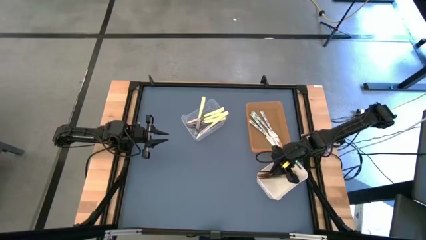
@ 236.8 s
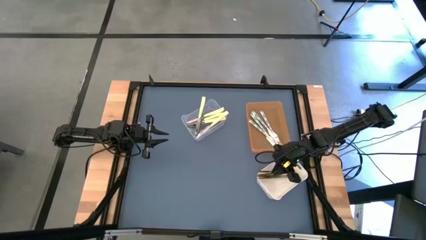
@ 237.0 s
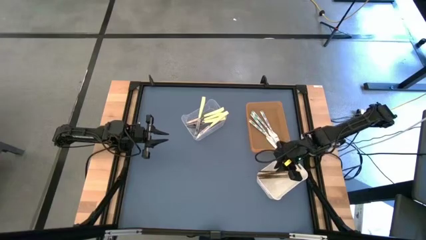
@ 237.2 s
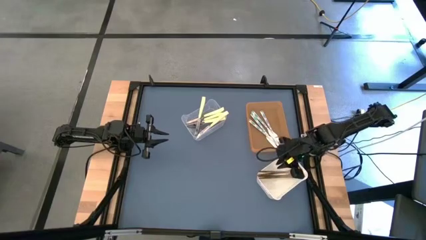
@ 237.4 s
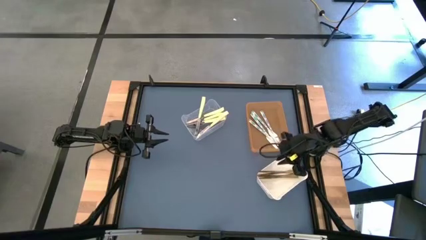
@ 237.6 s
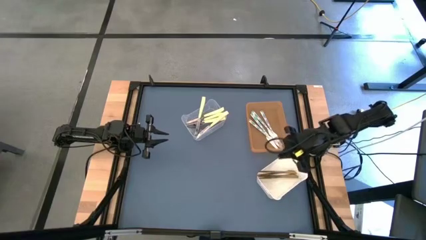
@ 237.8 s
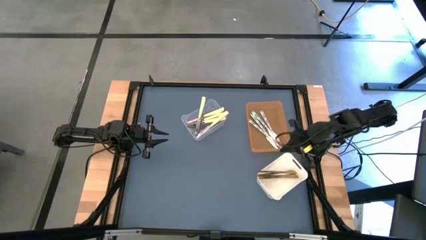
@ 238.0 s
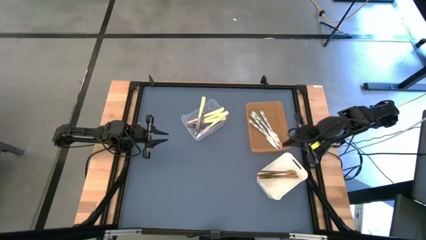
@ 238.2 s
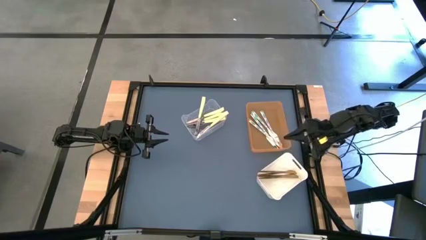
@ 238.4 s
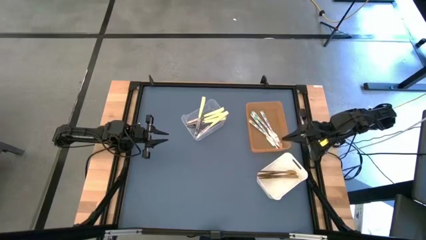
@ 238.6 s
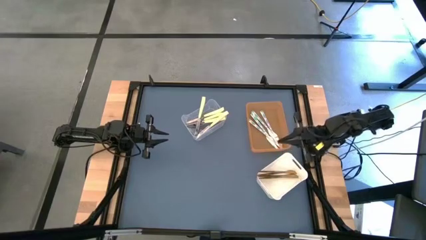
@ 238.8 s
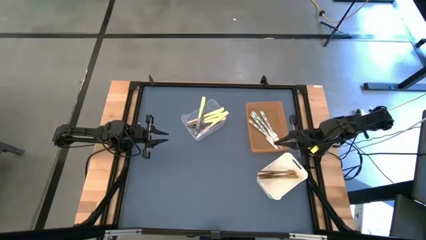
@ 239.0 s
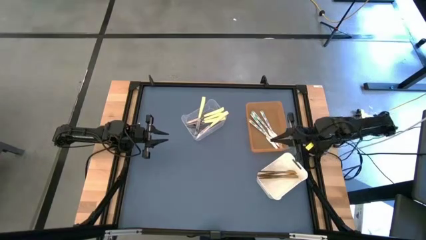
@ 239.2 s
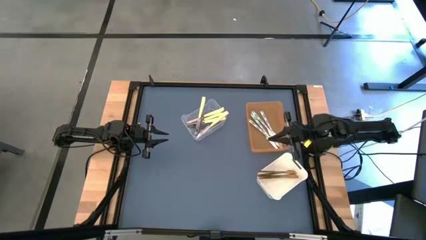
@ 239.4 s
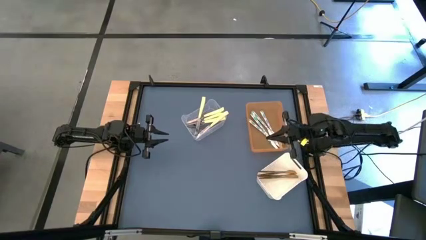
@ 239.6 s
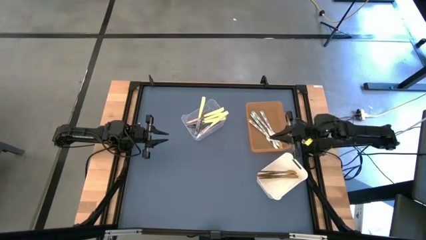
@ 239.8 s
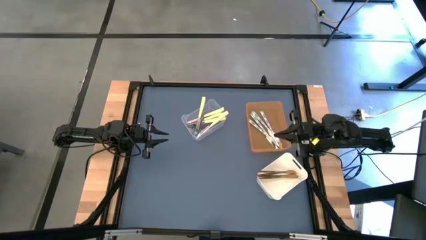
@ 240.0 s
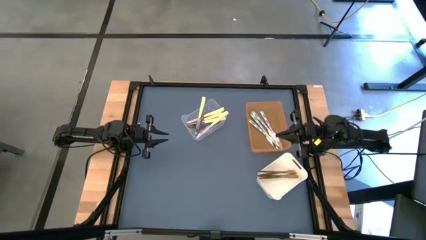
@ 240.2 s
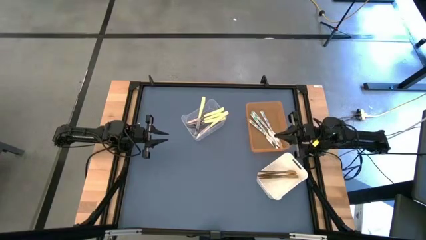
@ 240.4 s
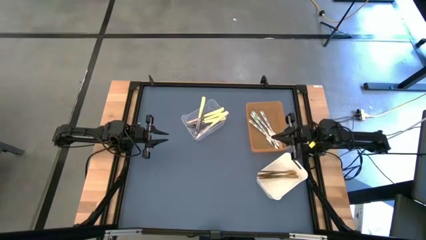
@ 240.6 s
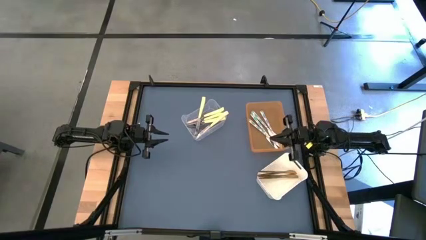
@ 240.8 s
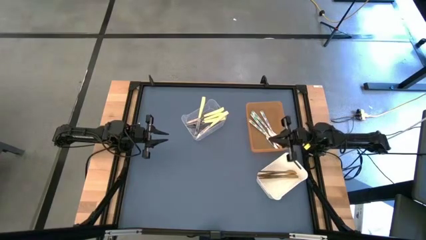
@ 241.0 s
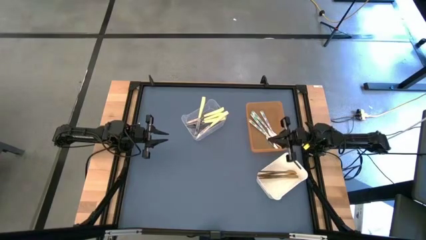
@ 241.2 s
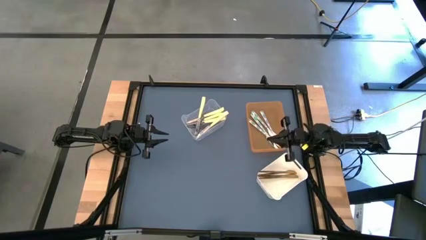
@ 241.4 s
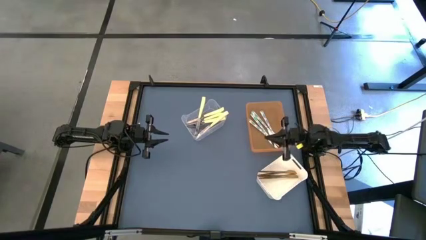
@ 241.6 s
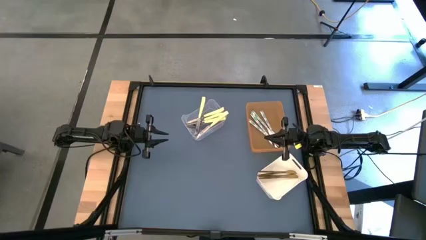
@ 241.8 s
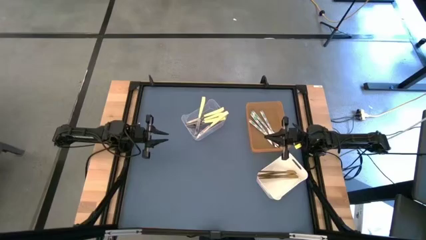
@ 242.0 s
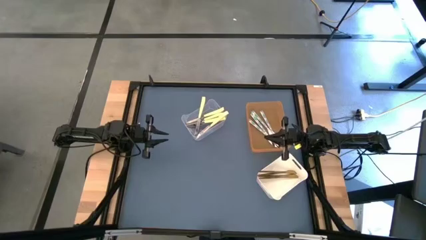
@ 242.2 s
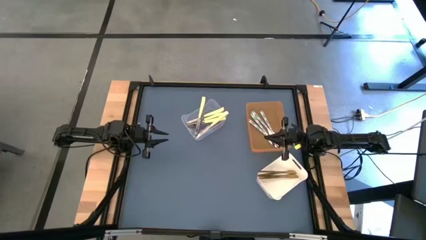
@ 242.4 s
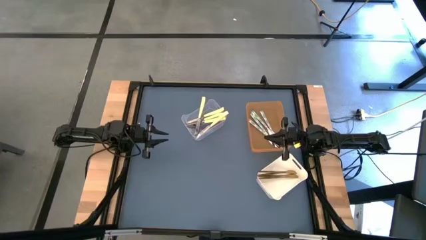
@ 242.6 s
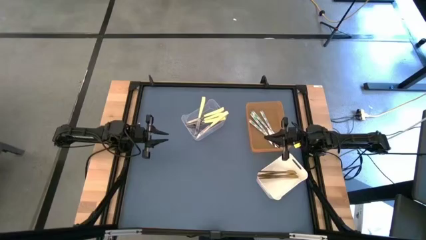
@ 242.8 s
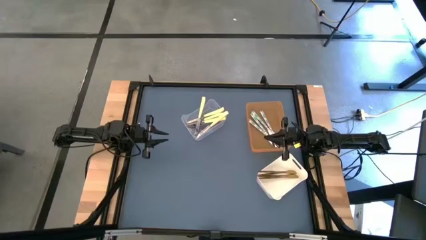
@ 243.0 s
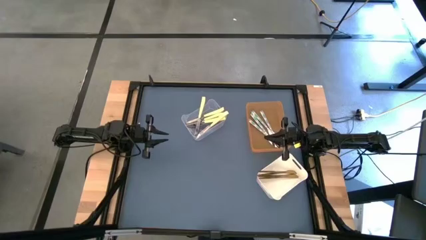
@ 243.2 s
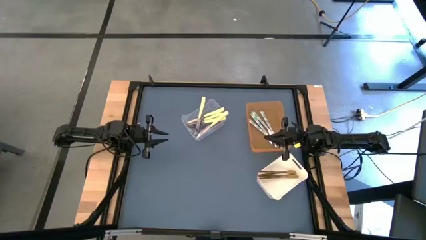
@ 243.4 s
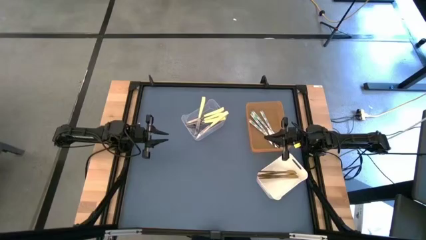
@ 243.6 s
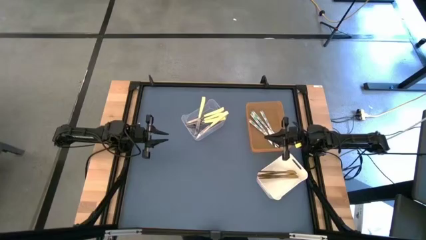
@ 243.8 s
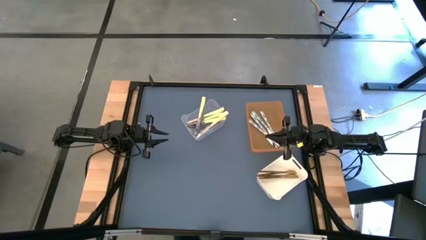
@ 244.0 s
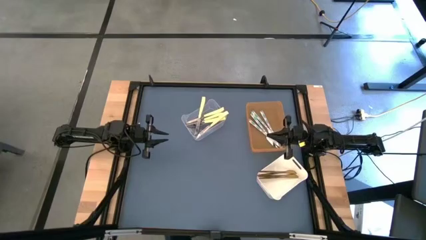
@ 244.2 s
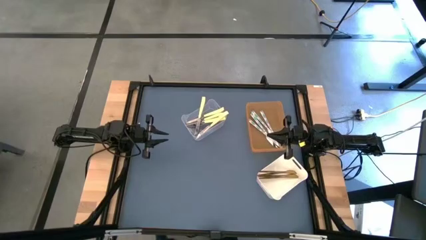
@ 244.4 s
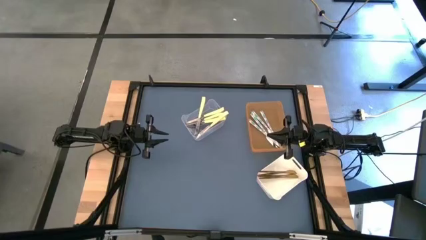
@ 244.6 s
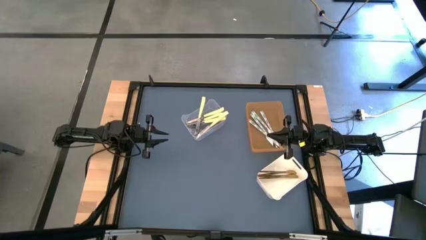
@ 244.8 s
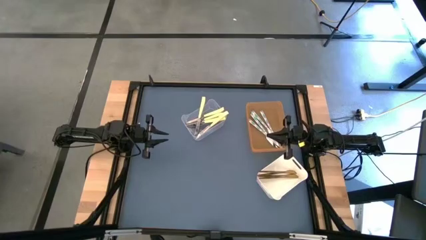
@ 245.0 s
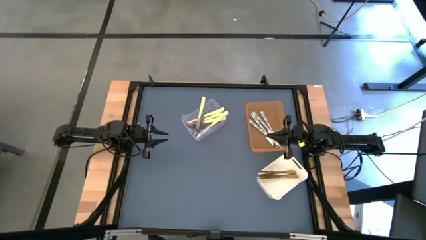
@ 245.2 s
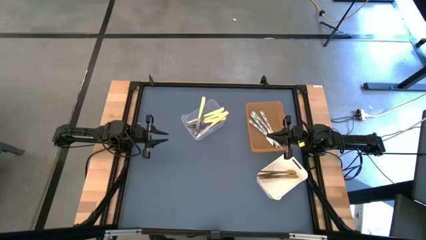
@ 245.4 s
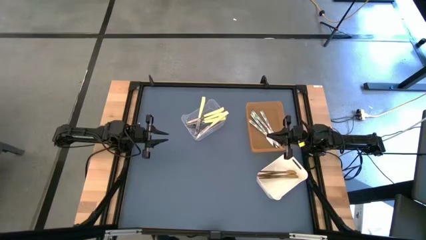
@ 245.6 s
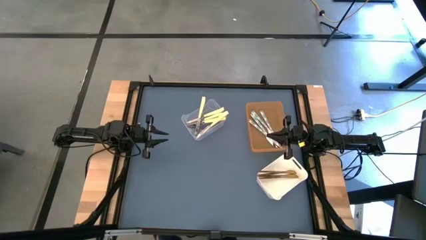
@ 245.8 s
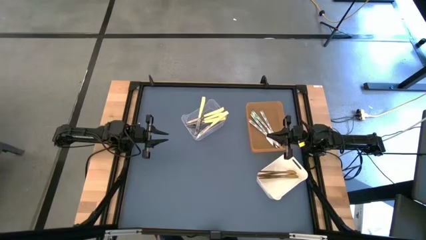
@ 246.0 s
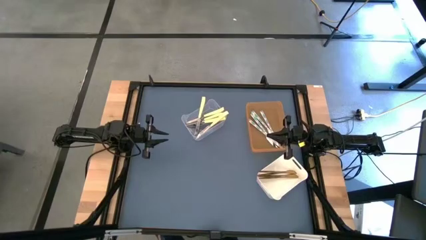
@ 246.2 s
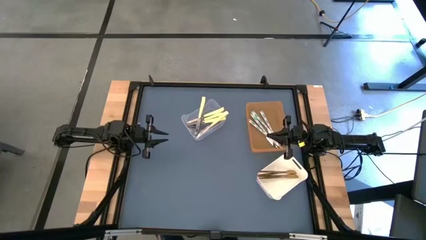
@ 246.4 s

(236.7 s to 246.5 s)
Task: Sort silverware by color (type)
Return to Home Position

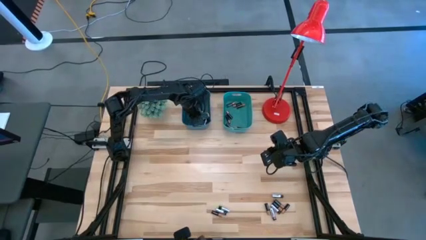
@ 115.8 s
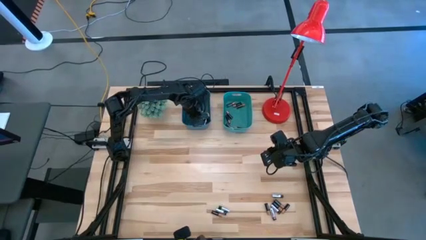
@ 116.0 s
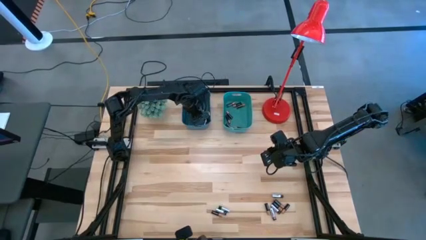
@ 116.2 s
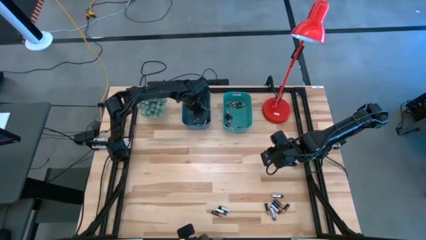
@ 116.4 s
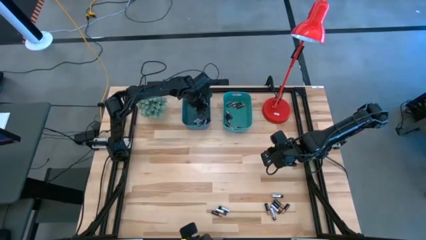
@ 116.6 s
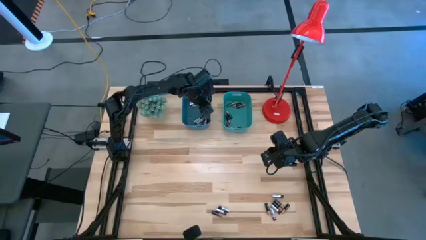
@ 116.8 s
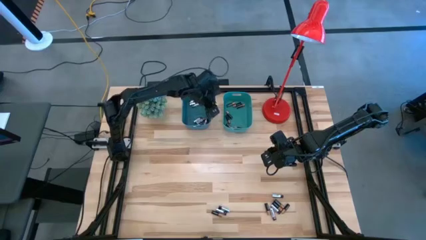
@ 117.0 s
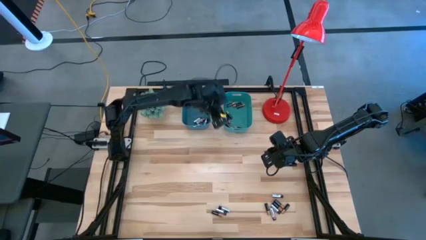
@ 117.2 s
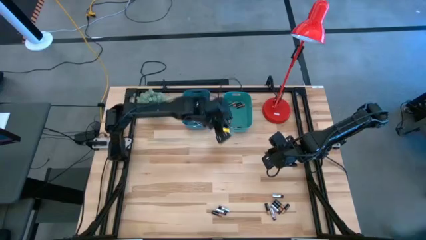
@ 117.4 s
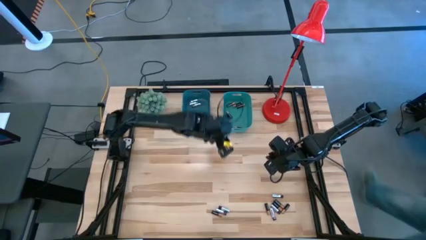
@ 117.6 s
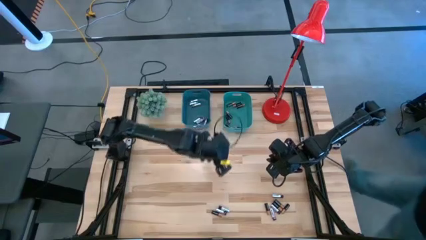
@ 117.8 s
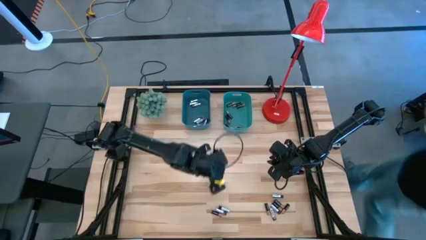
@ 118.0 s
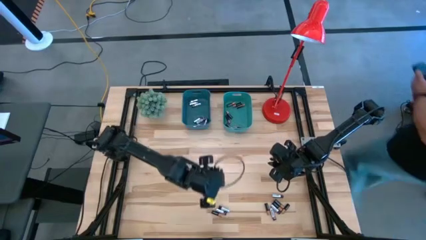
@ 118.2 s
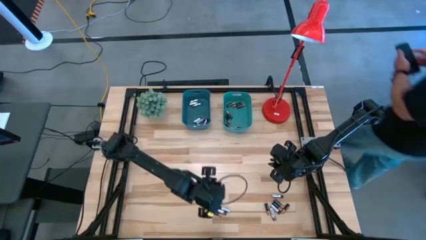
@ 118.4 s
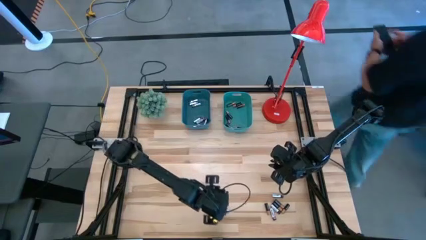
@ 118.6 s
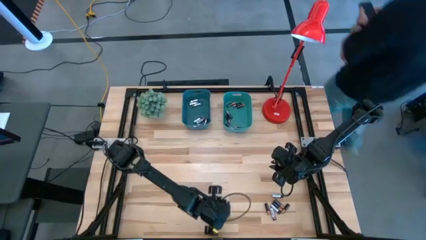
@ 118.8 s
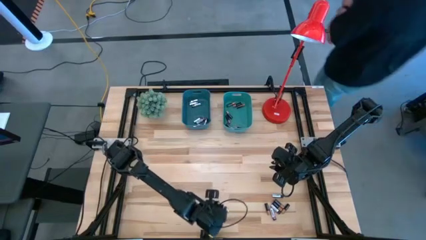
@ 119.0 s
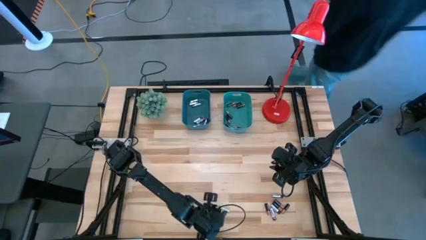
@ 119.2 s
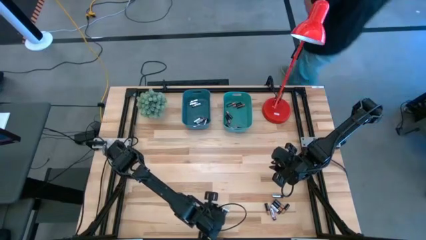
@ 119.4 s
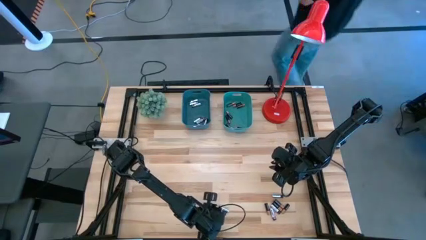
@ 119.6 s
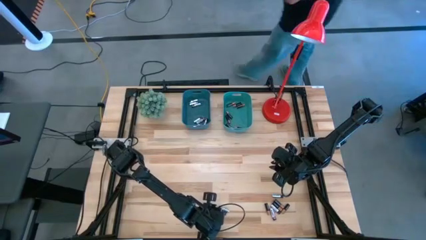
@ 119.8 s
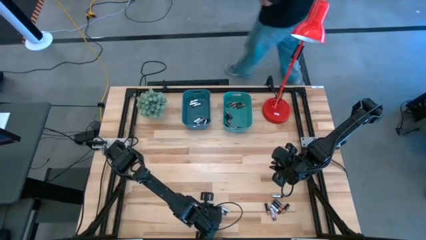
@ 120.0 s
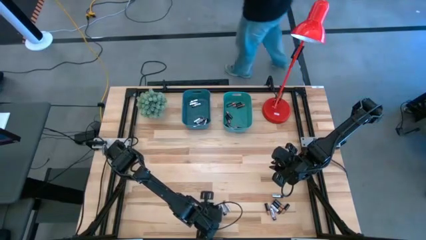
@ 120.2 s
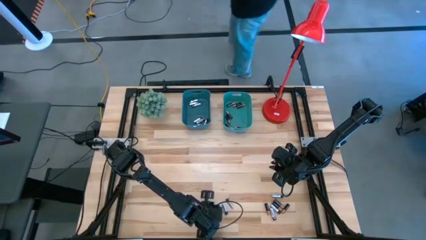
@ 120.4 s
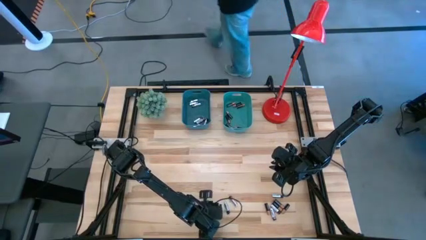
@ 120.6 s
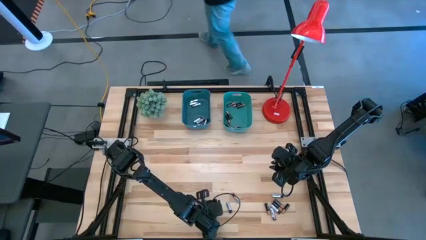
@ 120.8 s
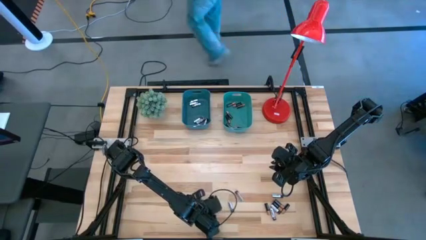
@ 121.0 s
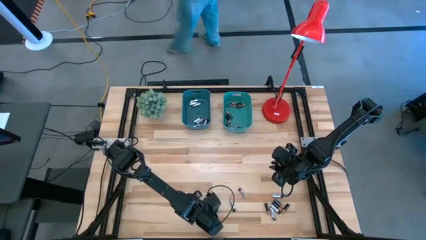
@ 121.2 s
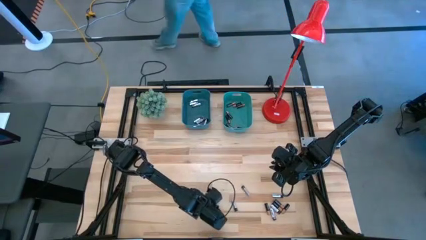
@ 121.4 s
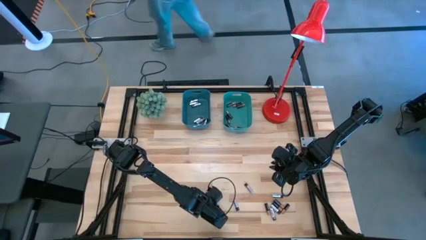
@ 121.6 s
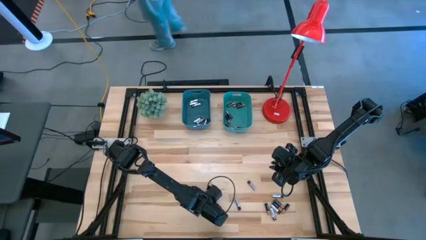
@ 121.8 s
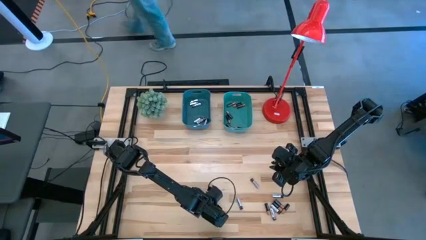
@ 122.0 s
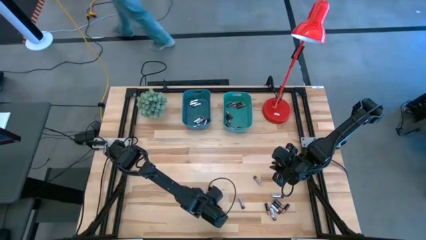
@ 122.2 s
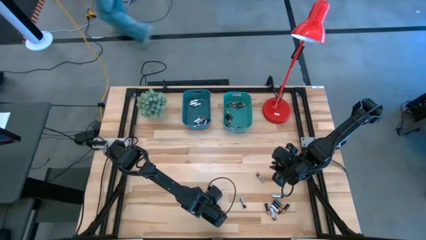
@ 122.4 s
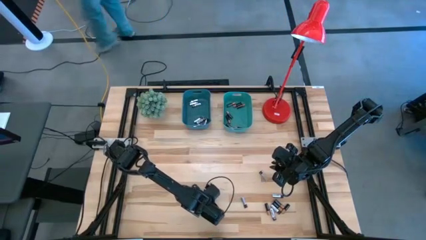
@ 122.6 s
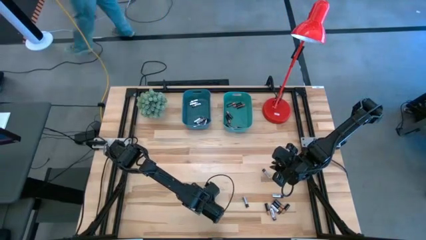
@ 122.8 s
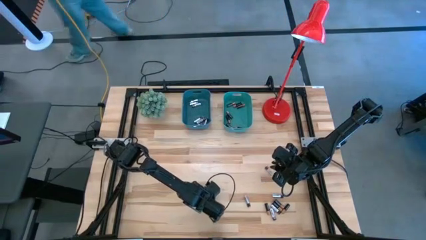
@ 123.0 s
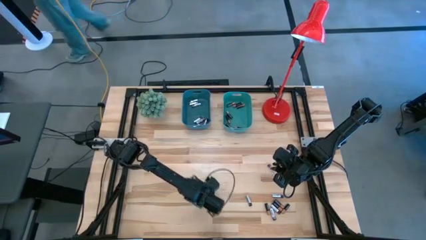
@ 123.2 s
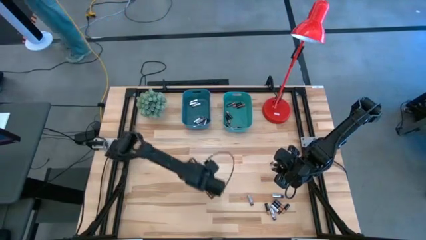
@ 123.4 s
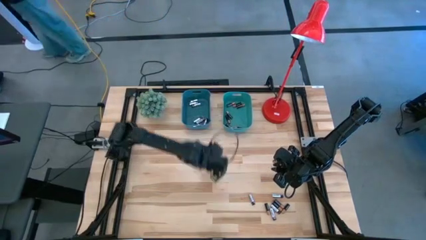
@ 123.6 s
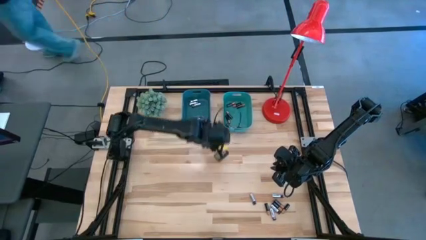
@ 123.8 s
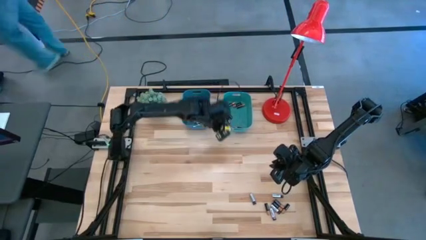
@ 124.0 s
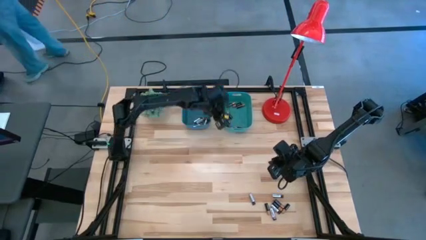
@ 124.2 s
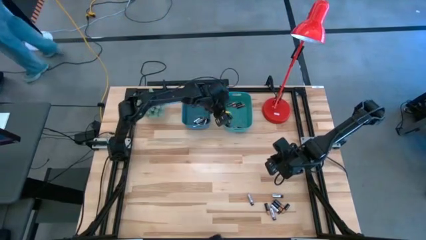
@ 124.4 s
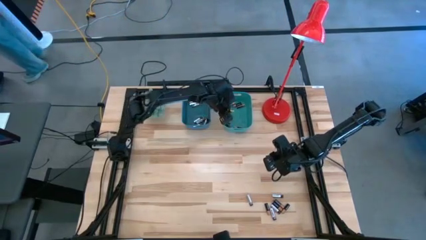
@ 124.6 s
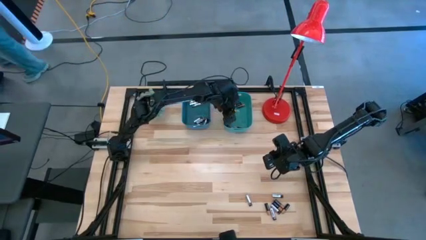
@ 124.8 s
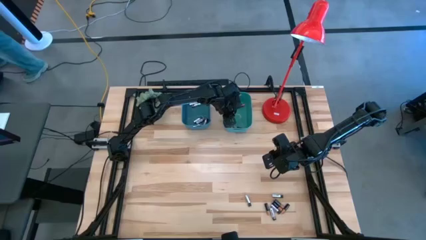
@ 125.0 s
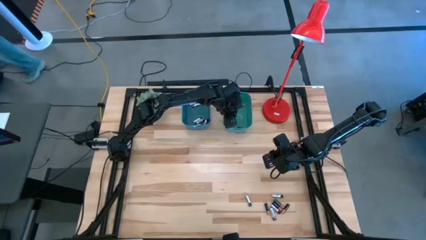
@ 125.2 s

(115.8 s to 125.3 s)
Task: Sort batteries
Put the black battery into the green bin
